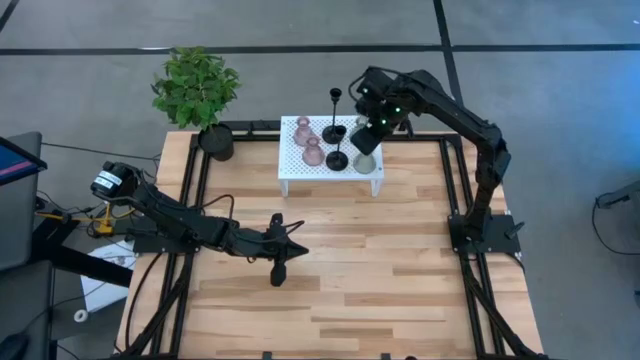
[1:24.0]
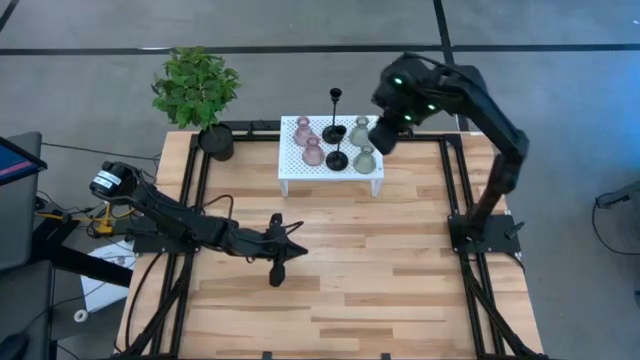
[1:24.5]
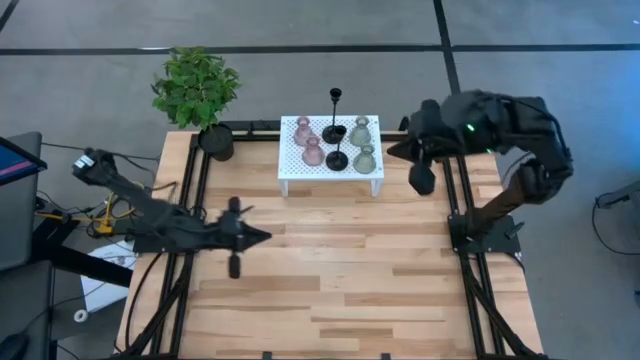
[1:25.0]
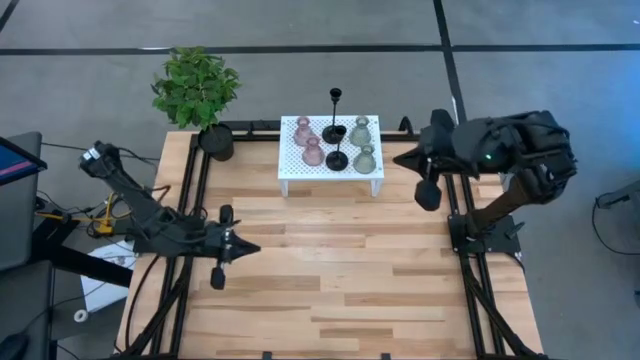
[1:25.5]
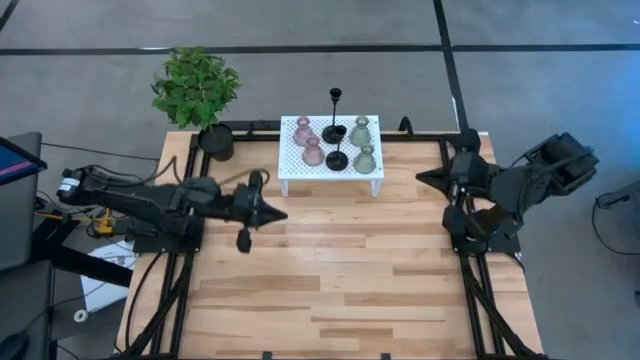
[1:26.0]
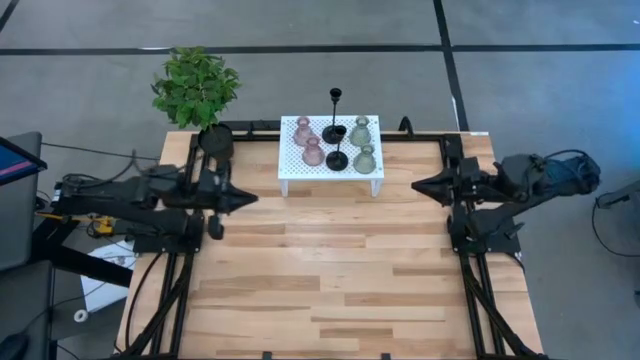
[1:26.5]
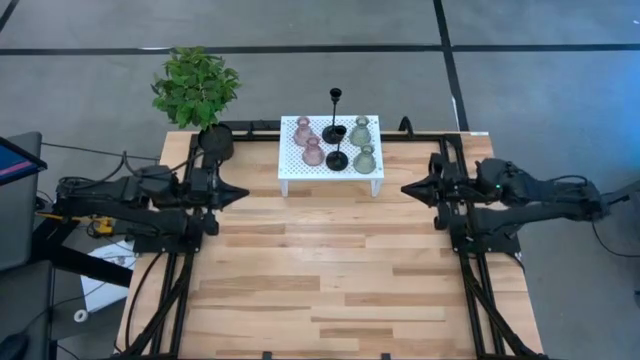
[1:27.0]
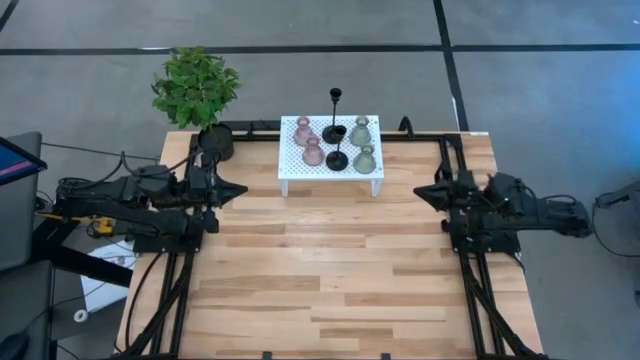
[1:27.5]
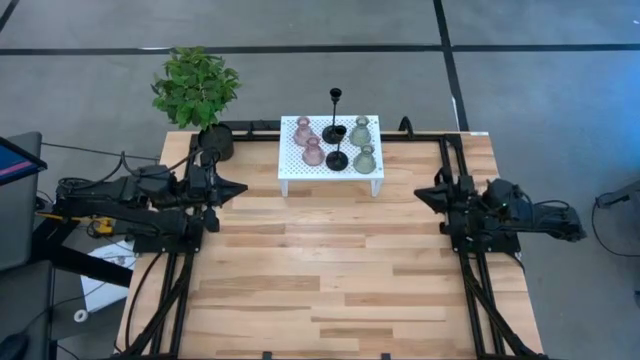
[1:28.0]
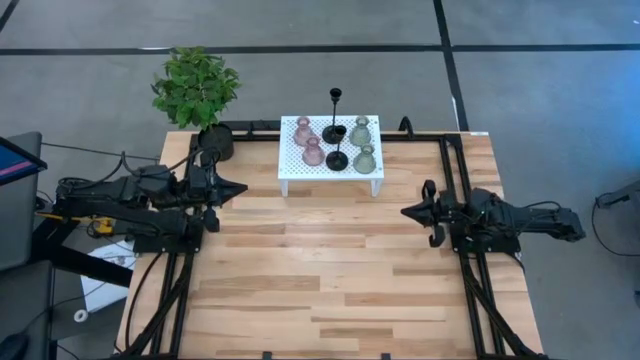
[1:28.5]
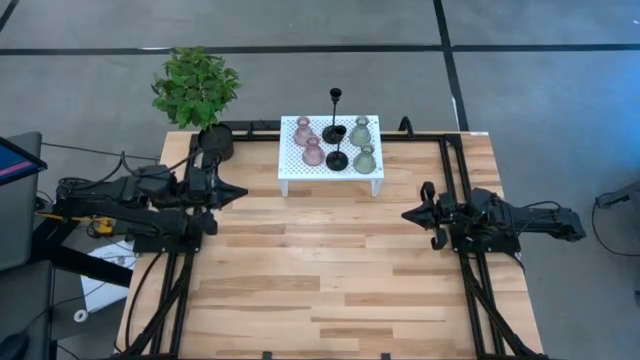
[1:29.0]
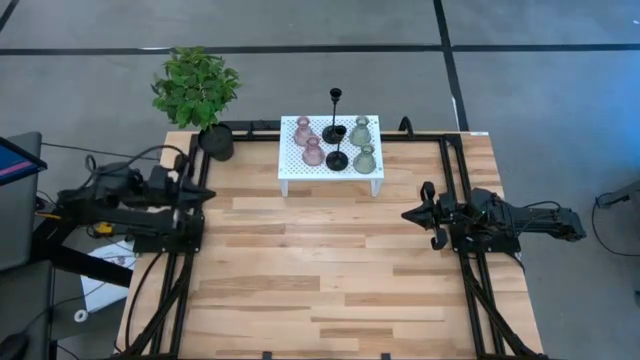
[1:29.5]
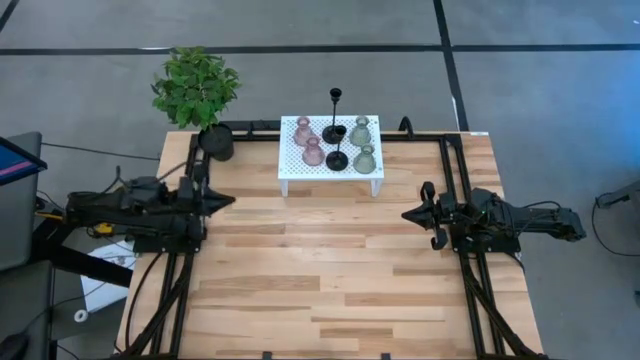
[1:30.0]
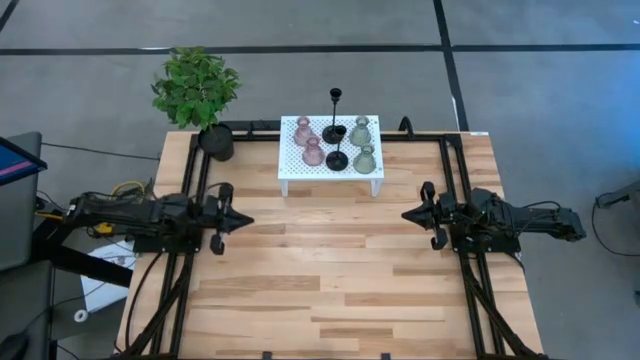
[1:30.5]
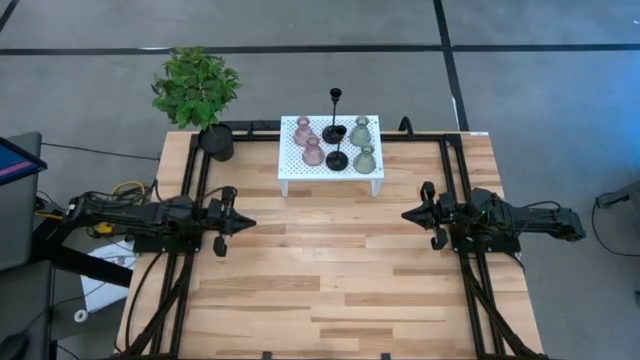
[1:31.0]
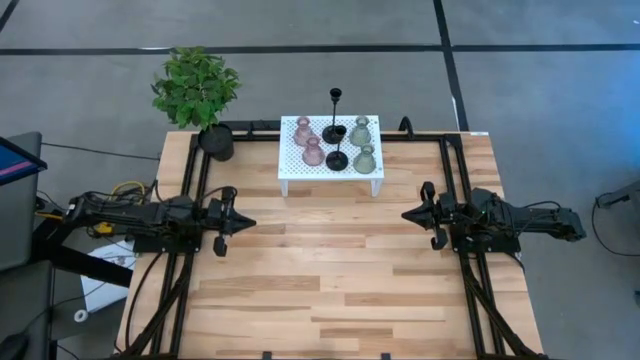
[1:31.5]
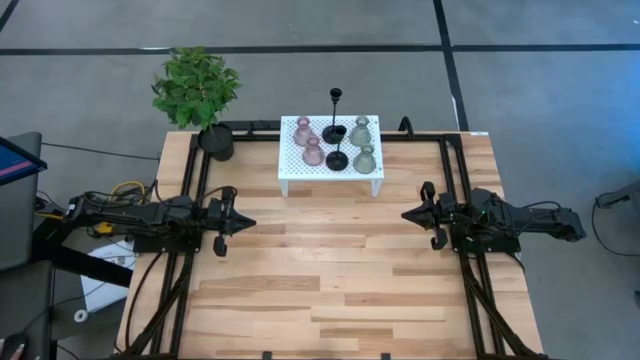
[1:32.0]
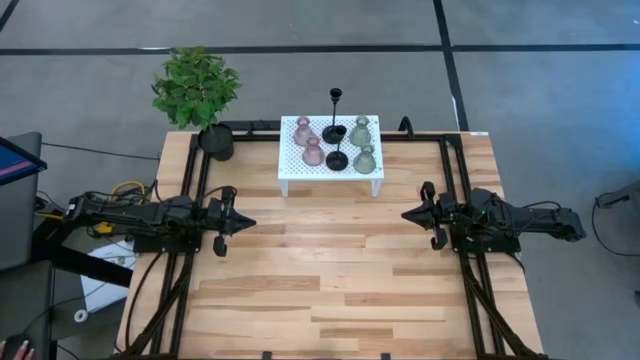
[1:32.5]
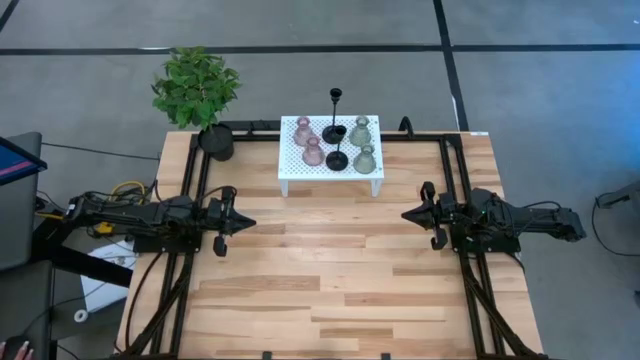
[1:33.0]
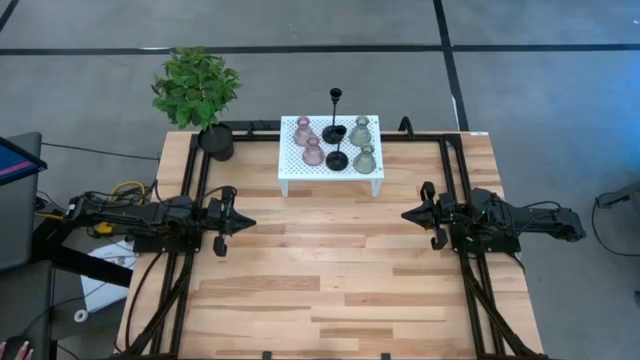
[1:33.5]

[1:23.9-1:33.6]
Task: Pick & Place candle stick holders
Return to Home Position

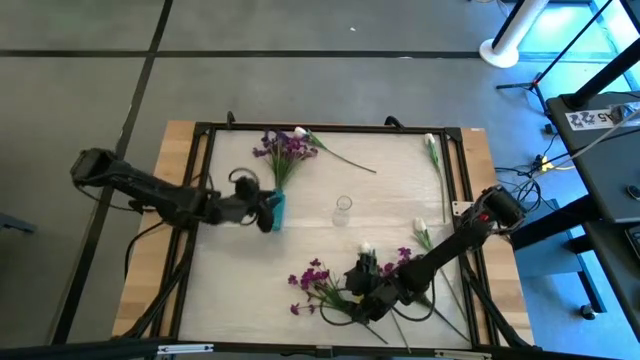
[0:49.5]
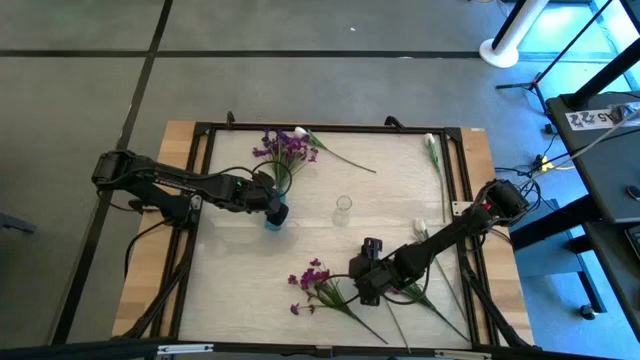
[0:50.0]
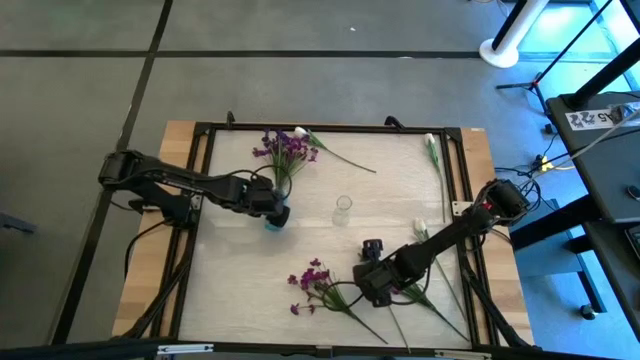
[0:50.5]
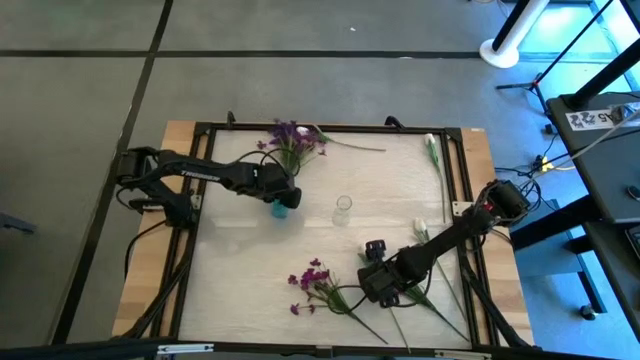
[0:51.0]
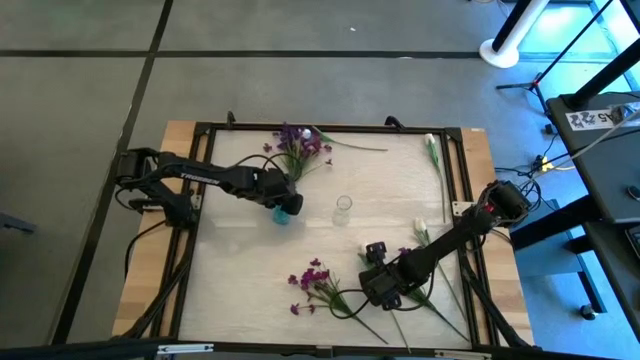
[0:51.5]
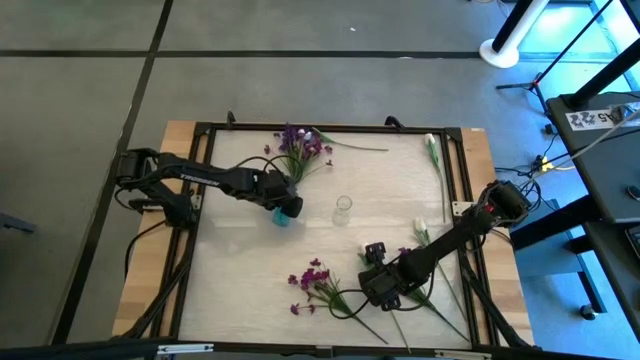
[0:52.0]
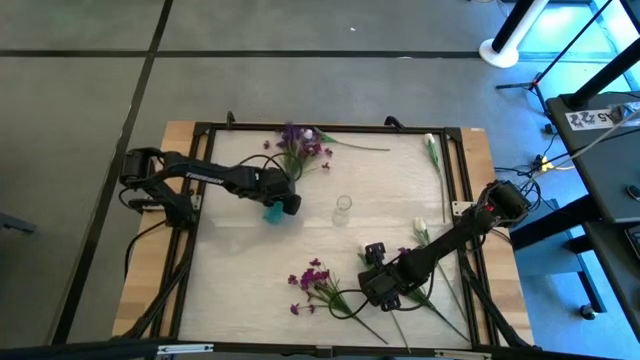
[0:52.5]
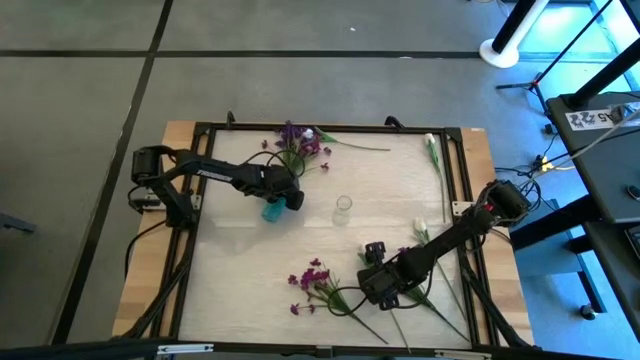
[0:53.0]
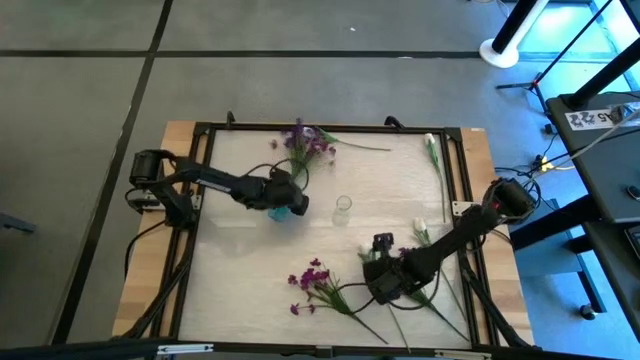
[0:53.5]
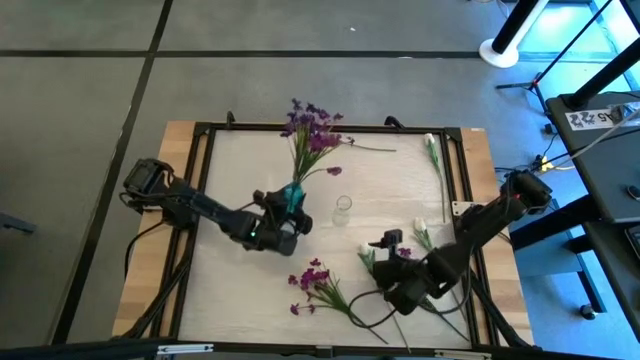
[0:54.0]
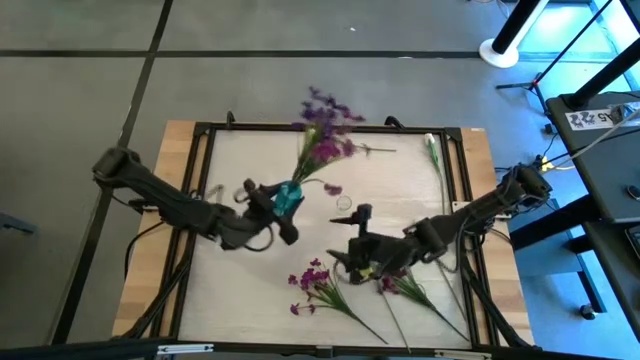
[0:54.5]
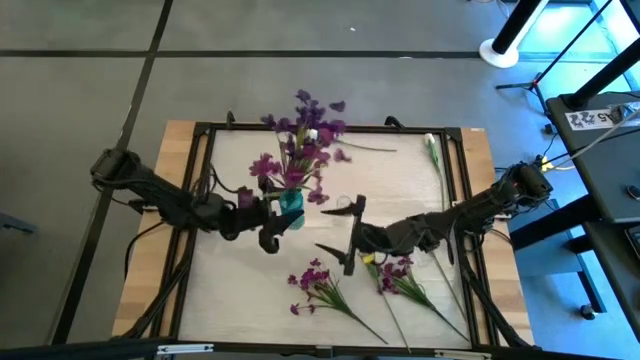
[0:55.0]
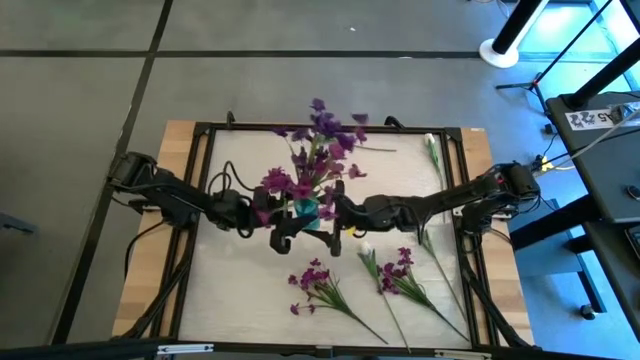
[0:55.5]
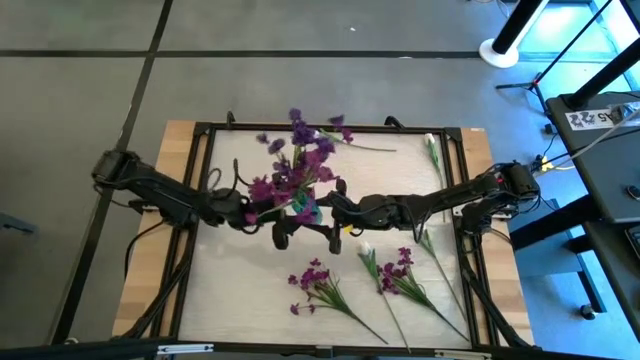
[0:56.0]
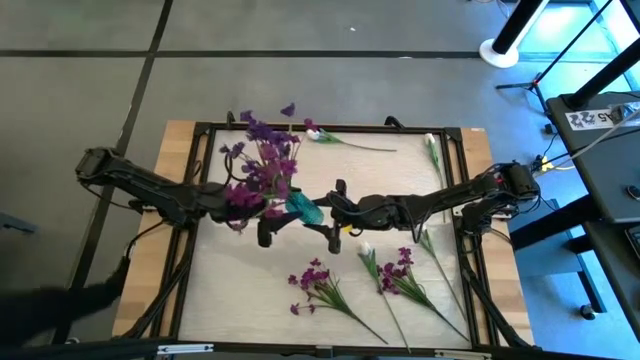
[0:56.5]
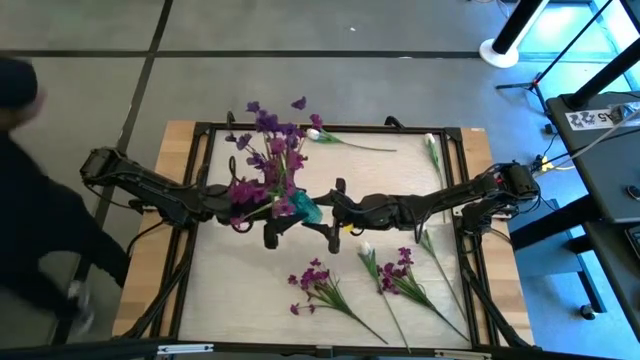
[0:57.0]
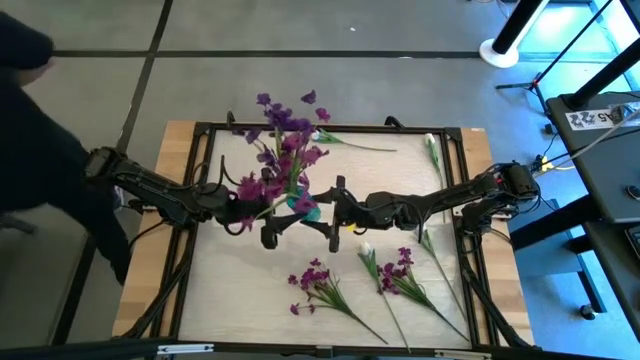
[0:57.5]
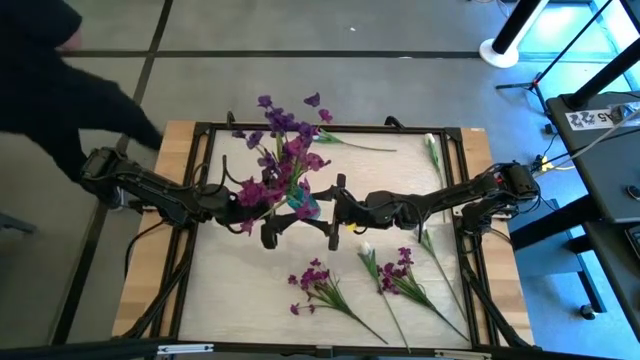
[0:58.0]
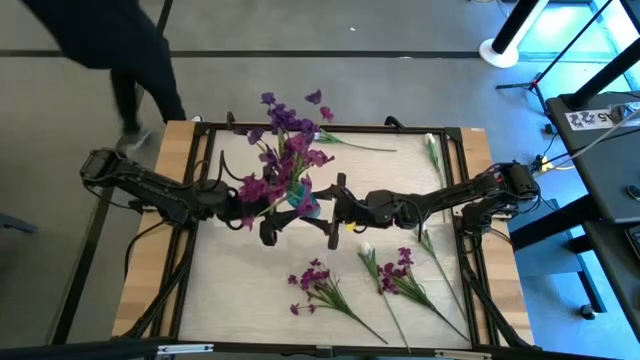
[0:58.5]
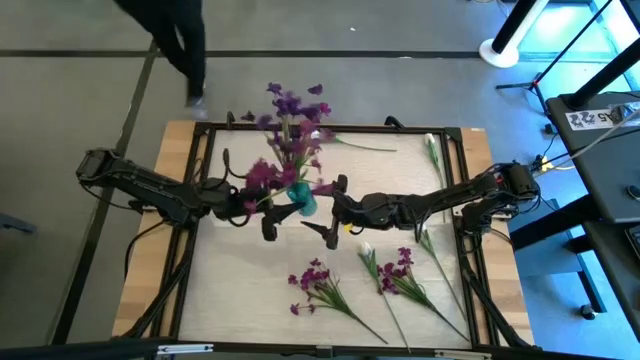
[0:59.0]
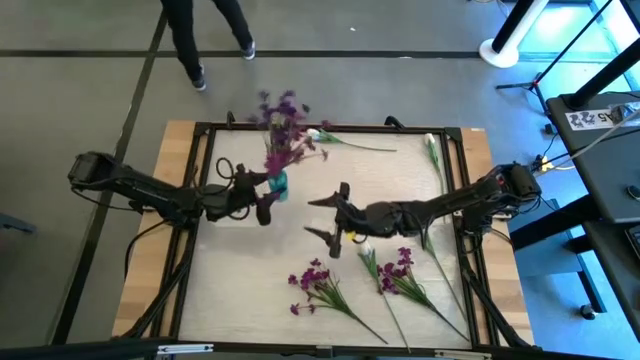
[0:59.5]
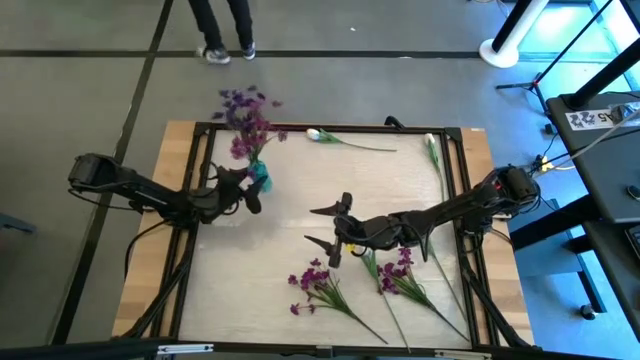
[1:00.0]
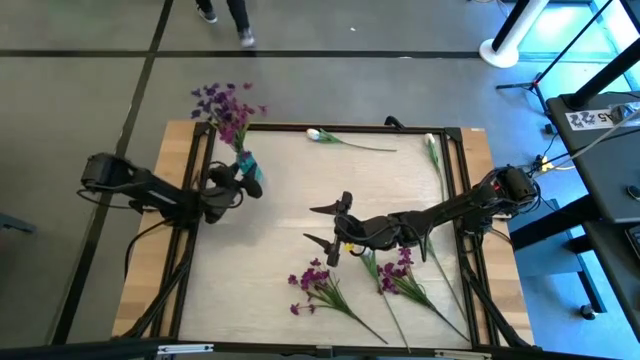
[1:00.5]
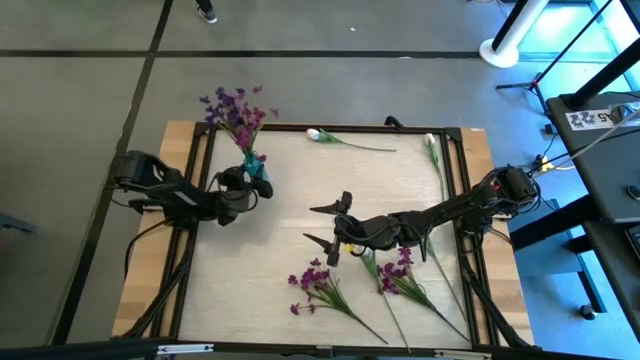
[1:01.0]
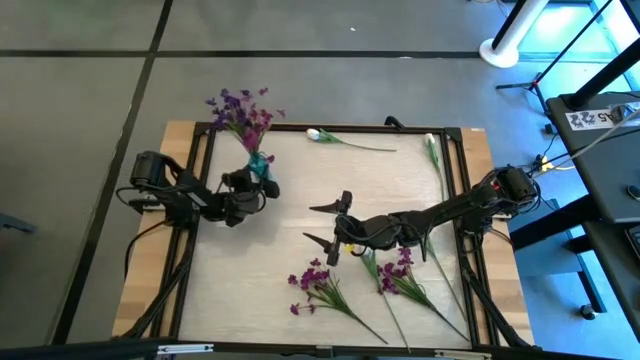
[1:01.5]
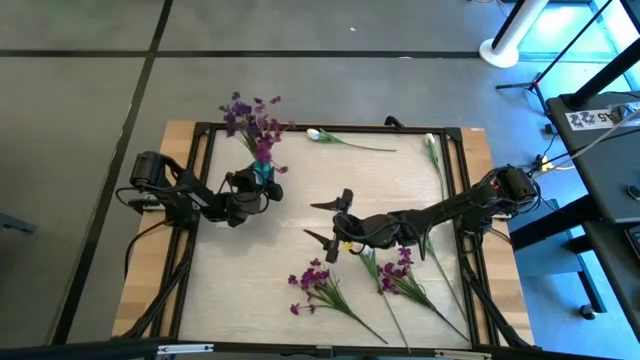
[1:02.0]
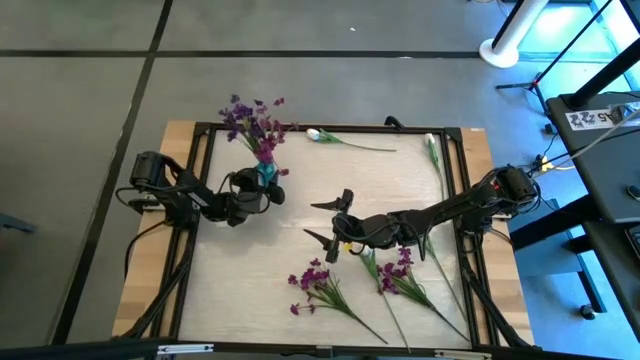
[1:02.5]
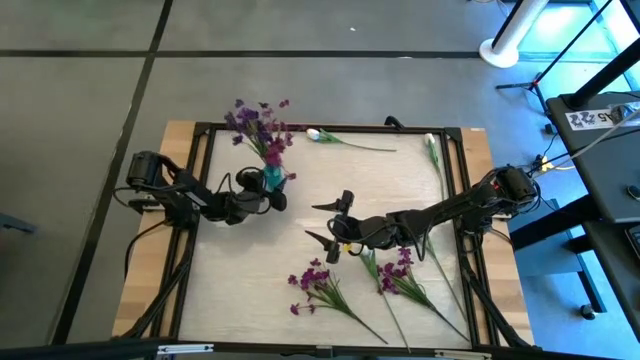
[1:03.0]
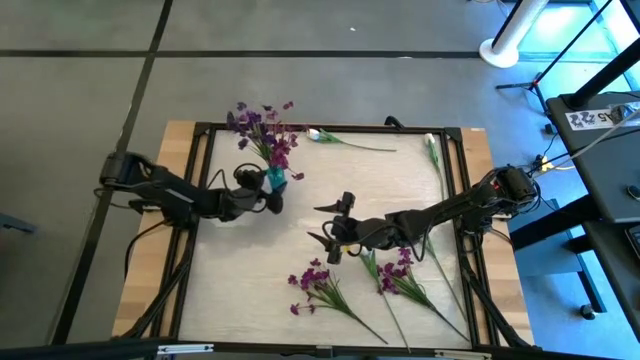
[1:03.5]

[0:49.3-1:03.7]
Task: Sort flowers into vase by color
Adjust the blue flower vase
